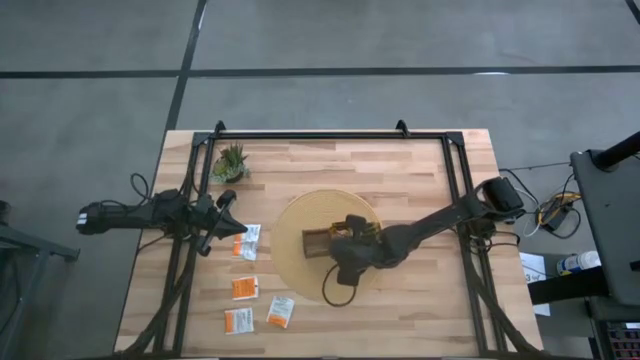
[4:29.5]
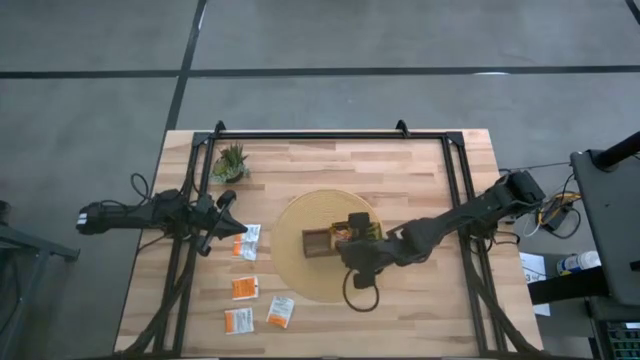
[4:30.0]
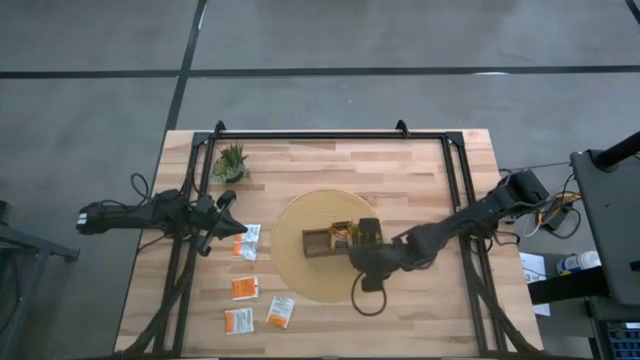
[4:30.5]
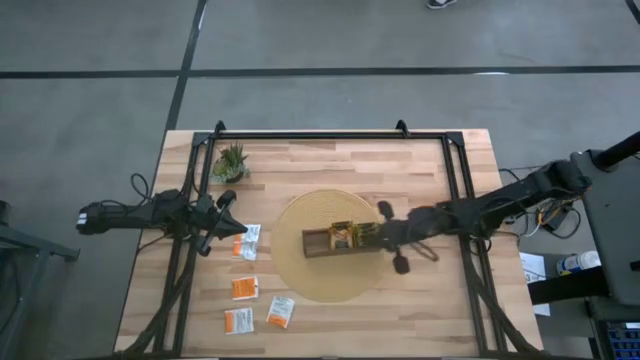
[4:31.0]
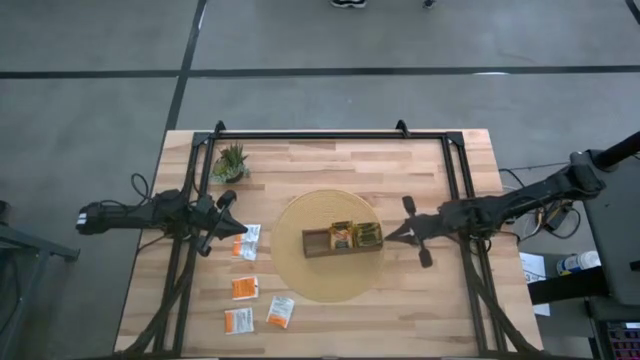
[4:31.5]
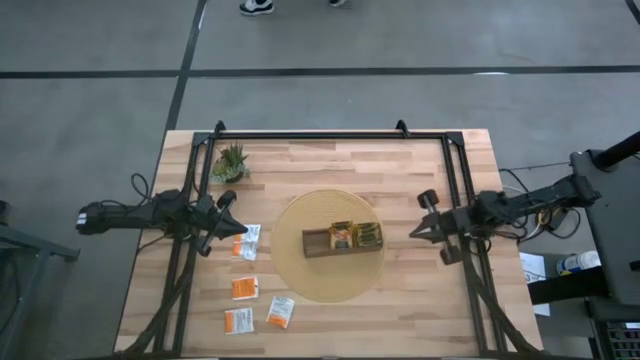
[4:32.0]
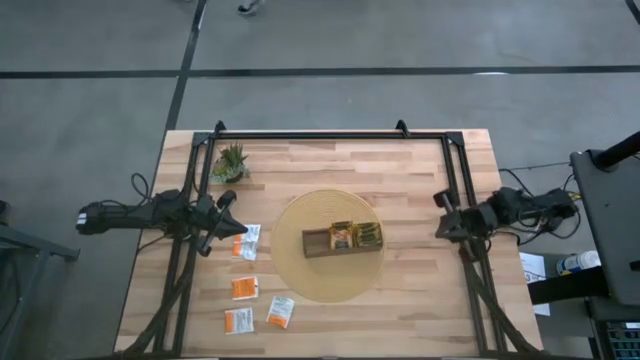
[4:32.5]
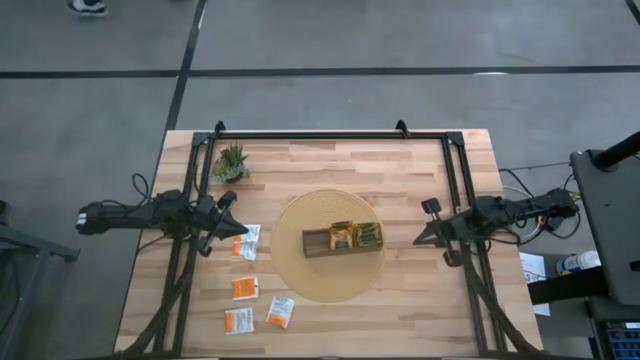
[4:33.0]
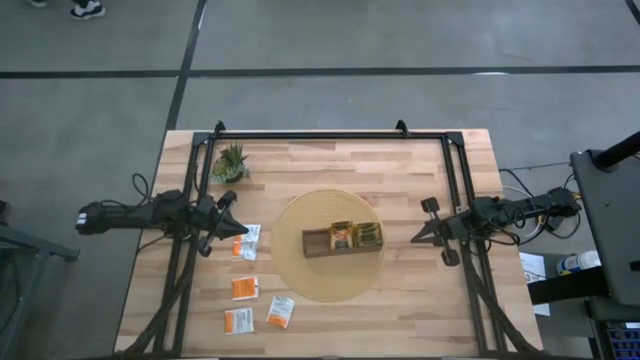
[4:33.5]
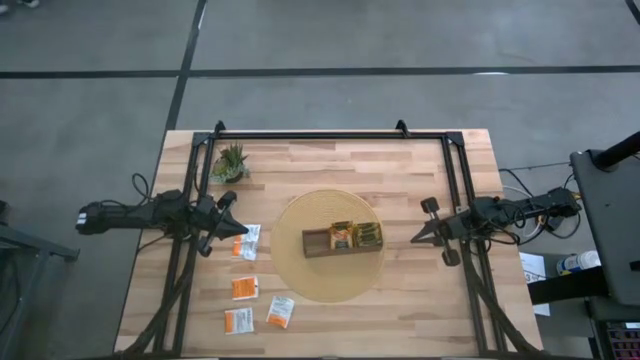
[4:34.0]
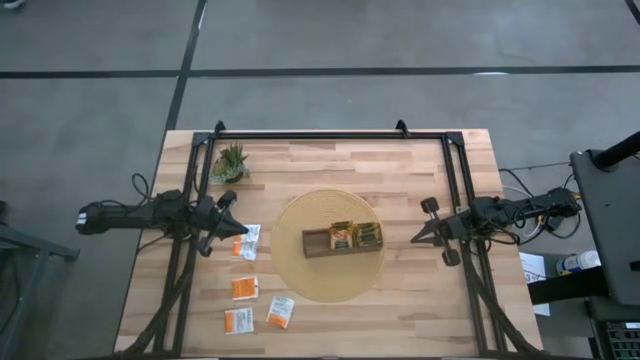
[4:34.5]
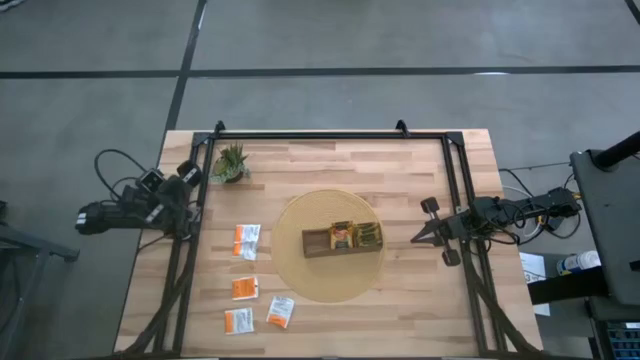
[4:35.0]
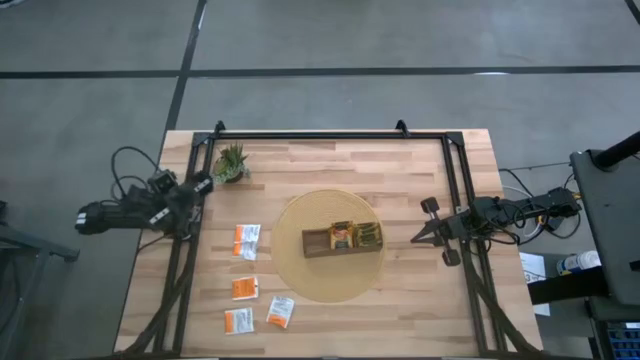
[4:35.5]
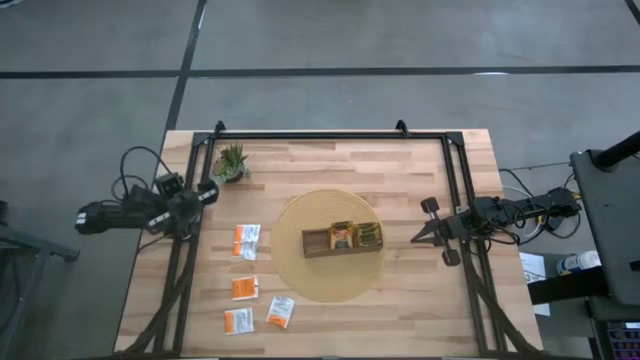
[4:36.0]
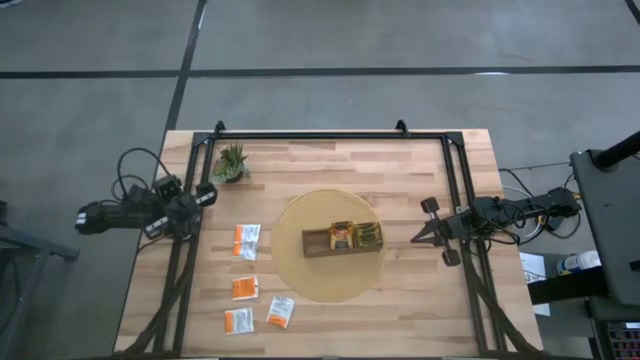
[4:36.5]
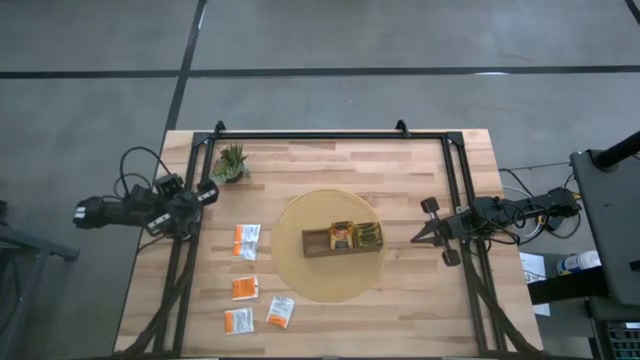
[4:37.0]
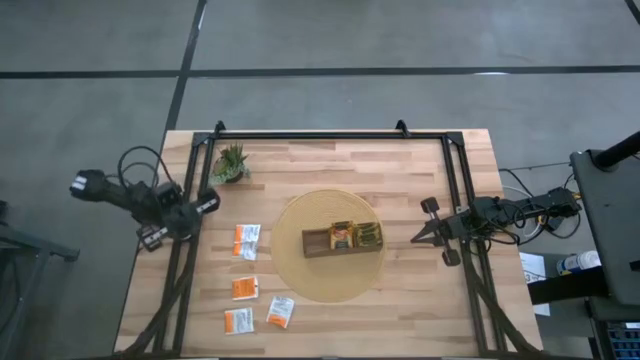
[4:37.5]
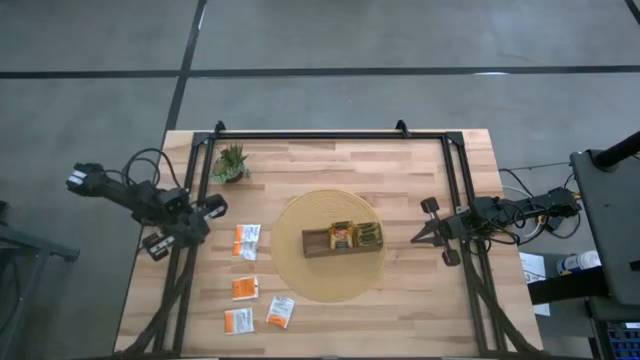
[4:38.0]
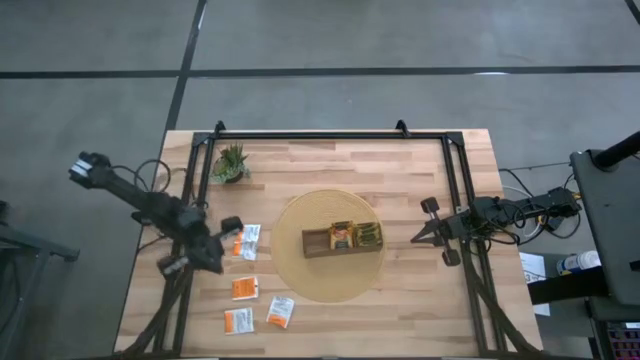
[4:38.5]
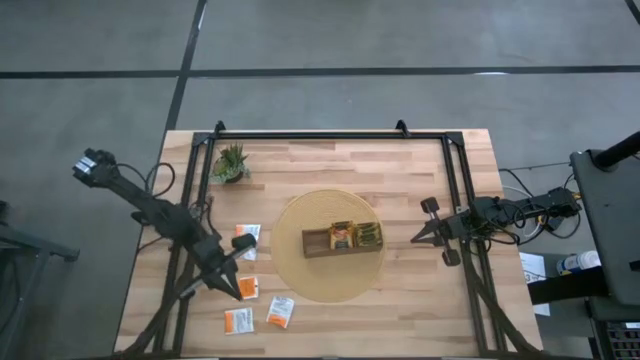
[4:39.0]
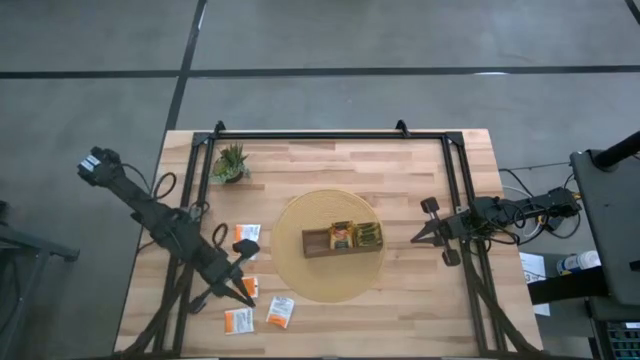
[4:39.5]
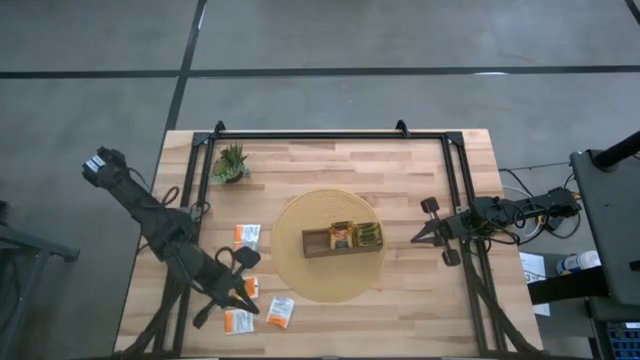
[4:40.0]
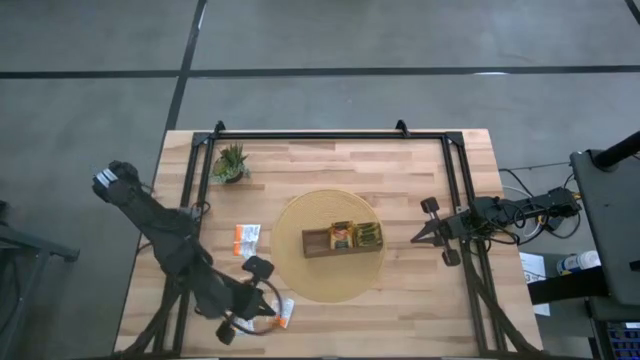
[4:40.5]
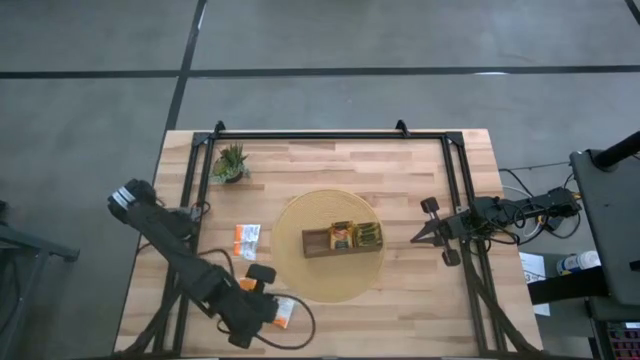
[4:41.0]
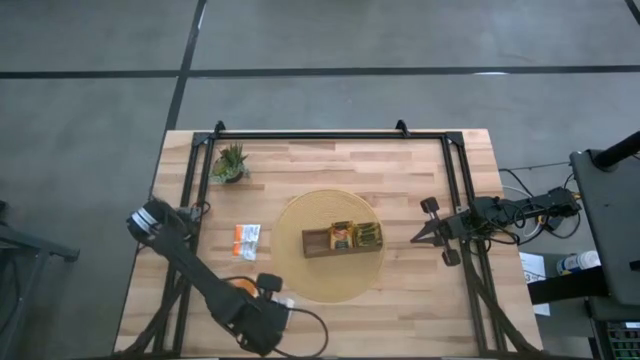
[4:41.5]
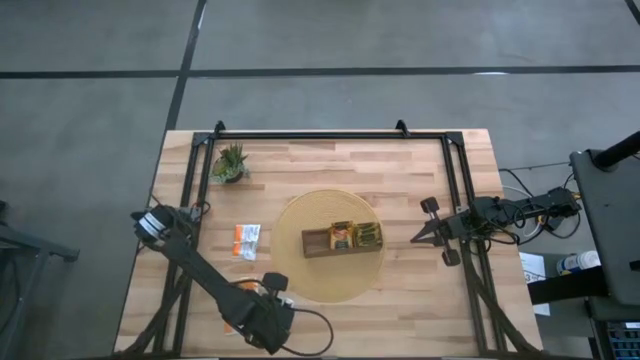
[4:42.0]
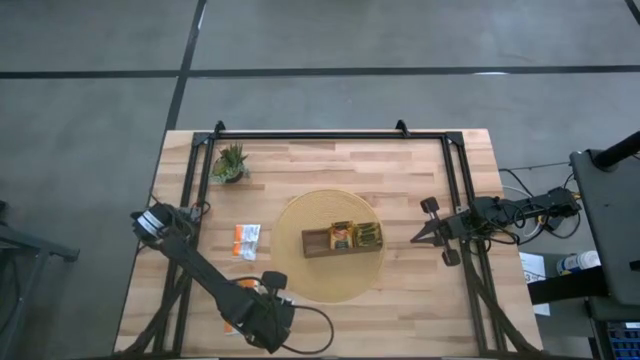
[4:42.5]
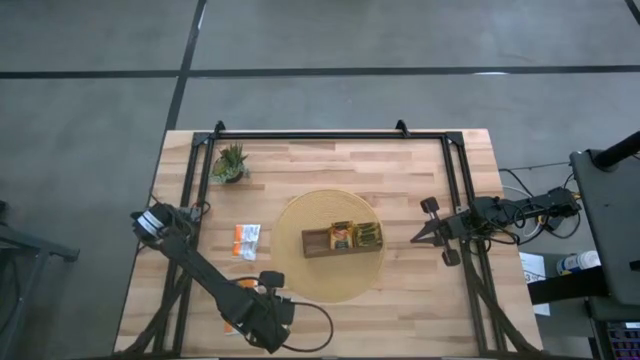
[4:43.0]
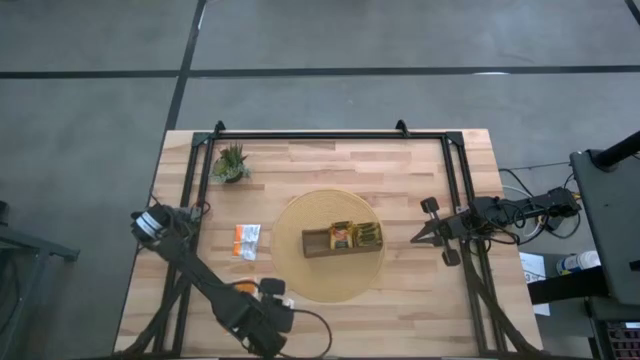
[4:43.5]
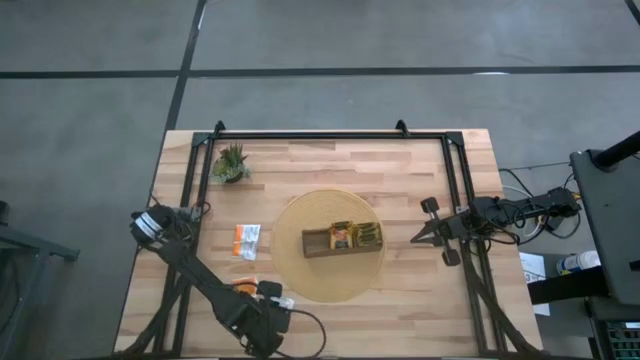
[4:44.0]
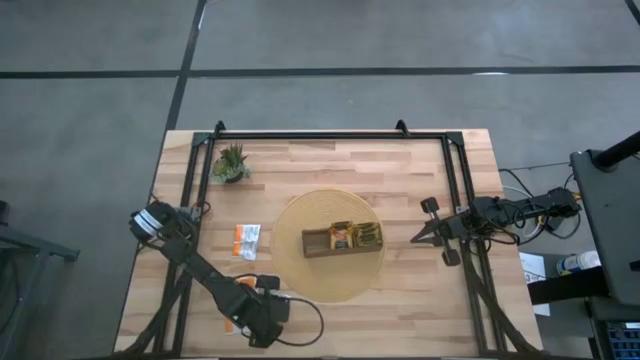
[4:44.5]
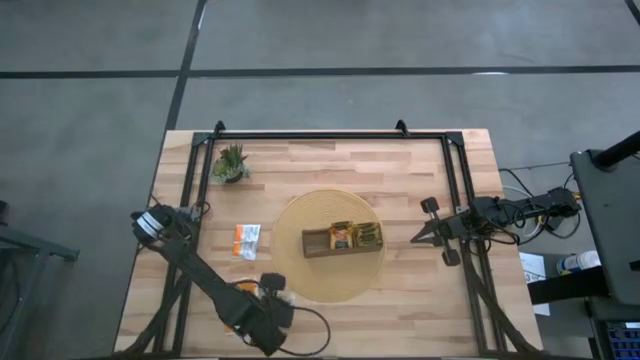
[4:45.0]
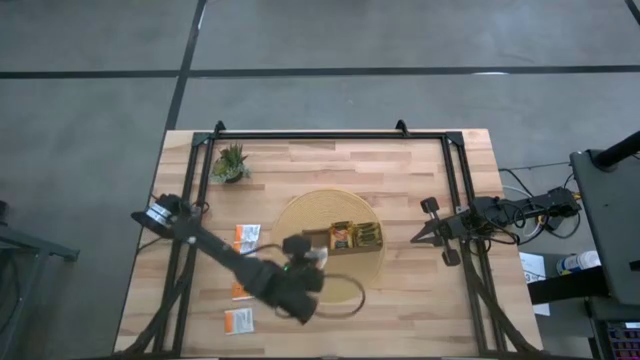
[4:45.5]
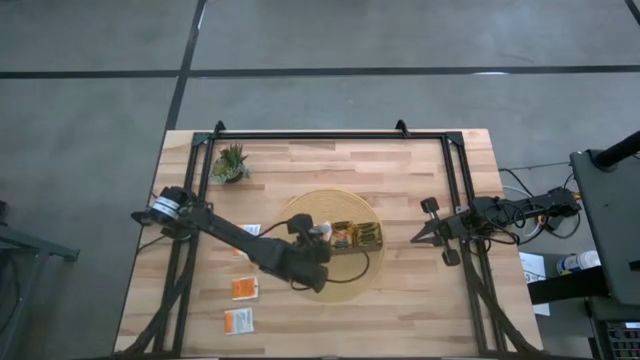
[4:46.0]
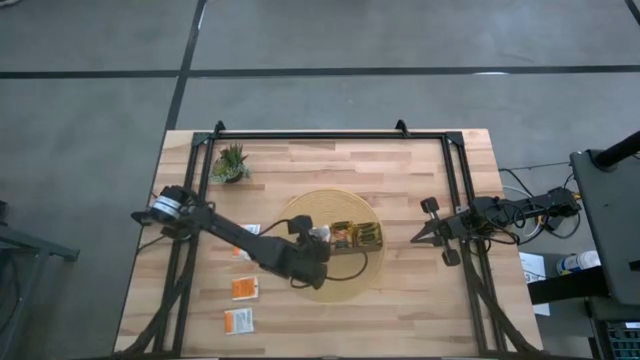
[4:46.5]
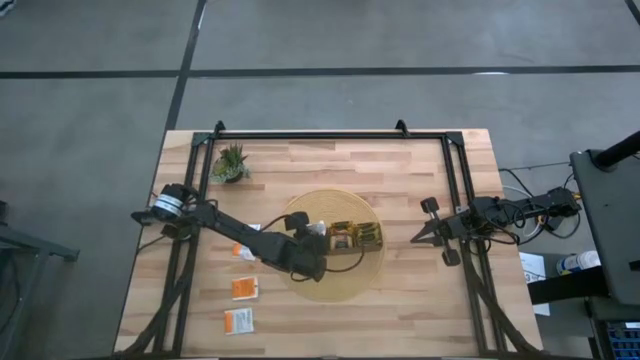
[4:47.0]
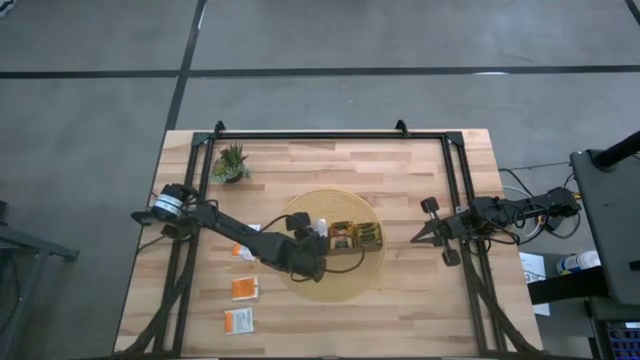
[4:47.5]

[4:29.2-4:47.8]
Task: Pick & Place Tea
Put the white tea bag into the left of the wooden organizer

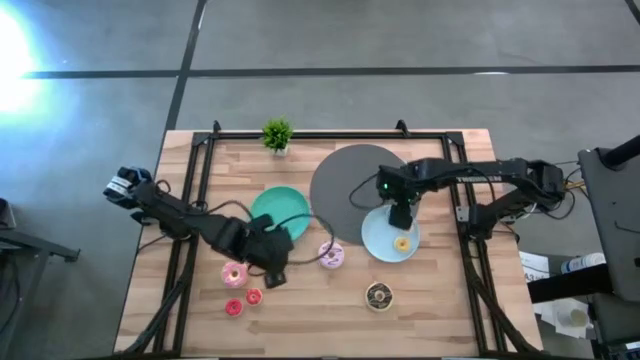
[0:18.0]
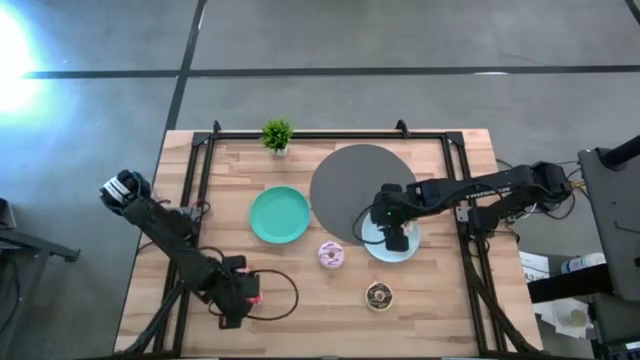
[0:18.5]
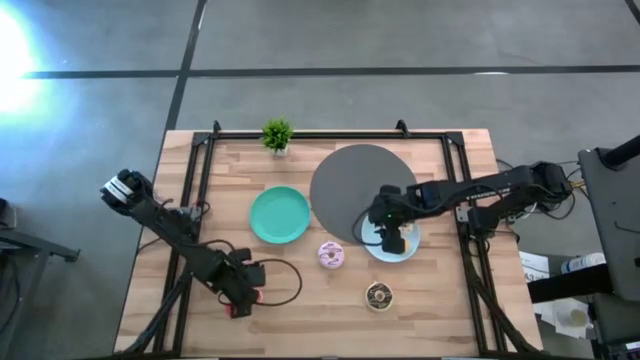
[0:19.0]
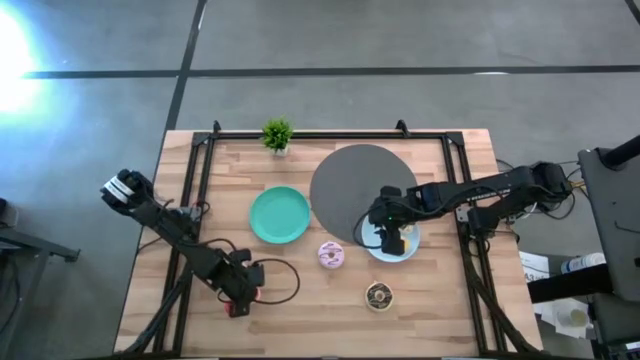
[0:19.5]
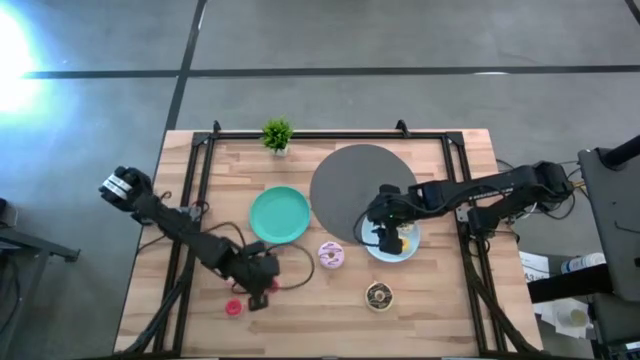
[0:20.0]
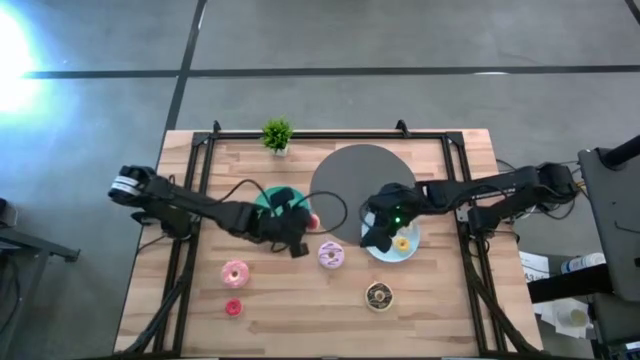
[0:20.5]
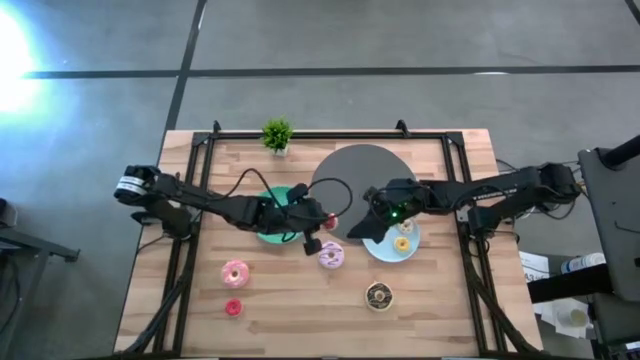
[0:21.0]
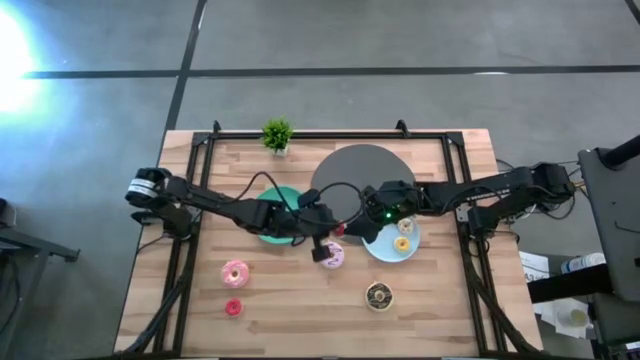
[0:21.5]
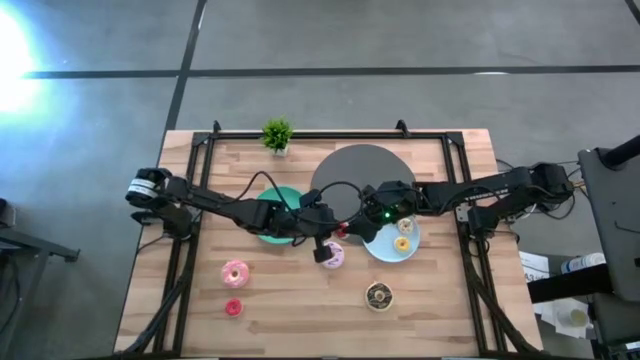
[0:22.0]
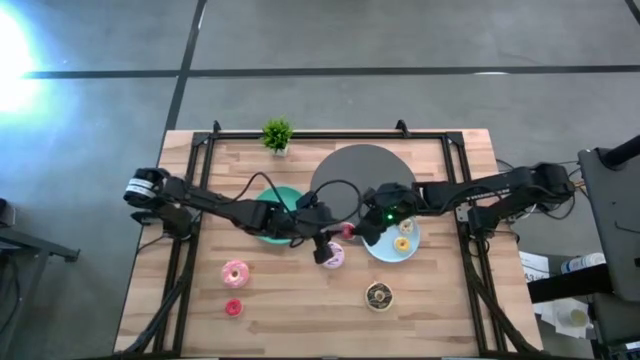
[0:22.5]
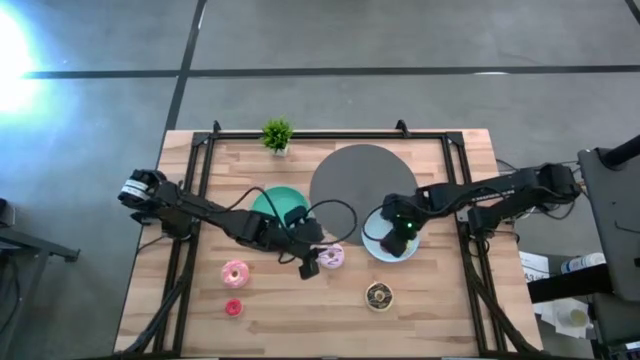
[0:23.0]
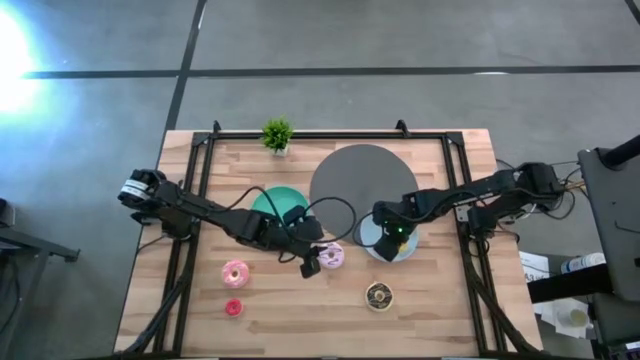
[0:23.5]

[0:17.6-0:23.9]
Task: Pick & Place donuts
Put the small orange donut on the blue plate
